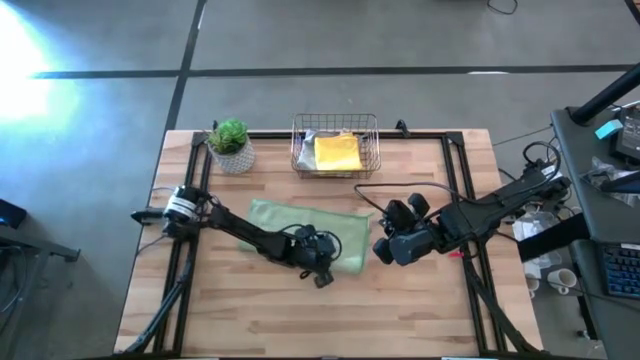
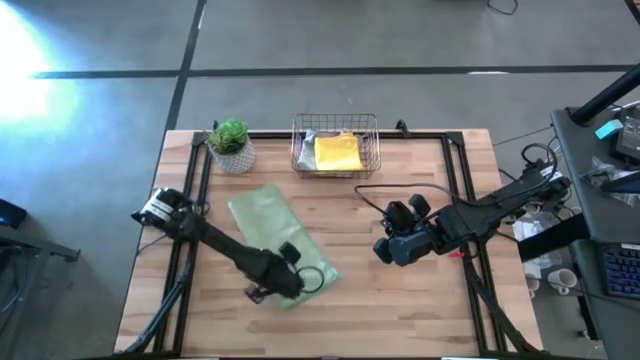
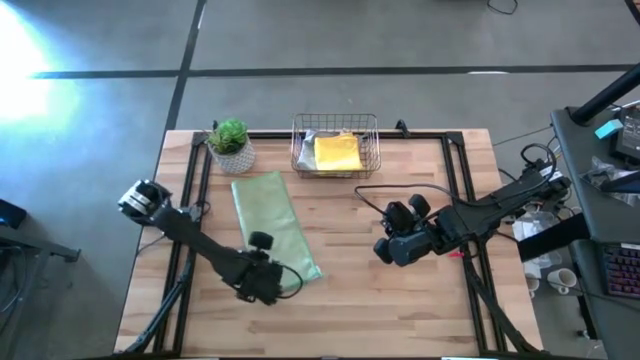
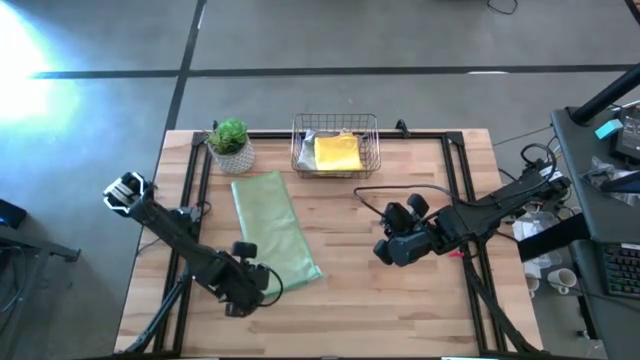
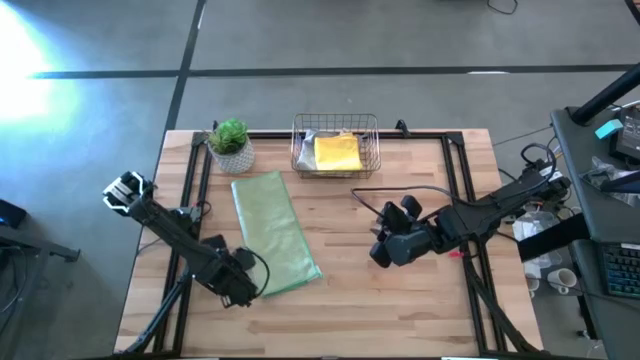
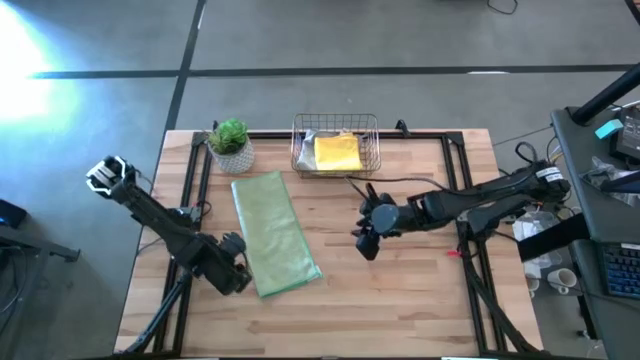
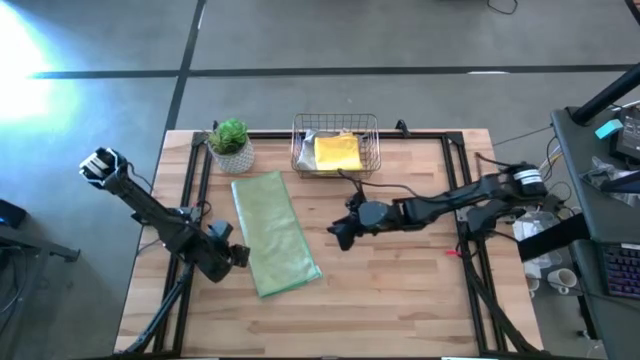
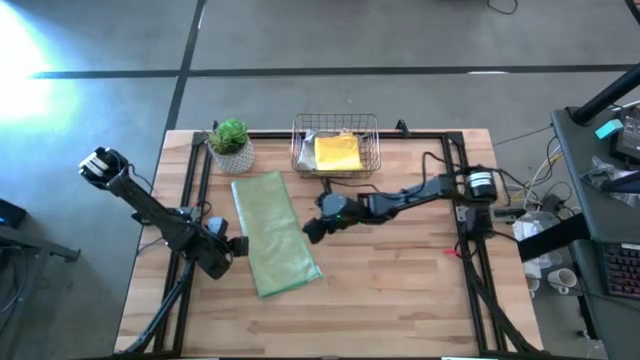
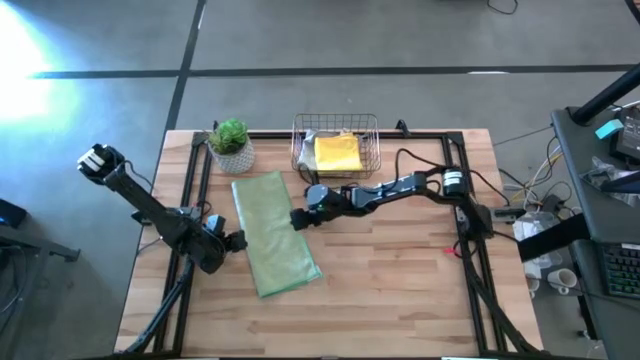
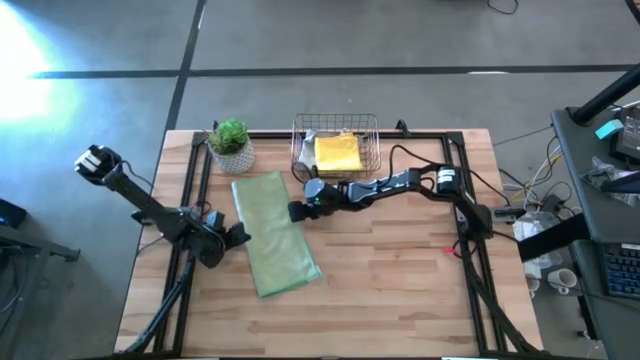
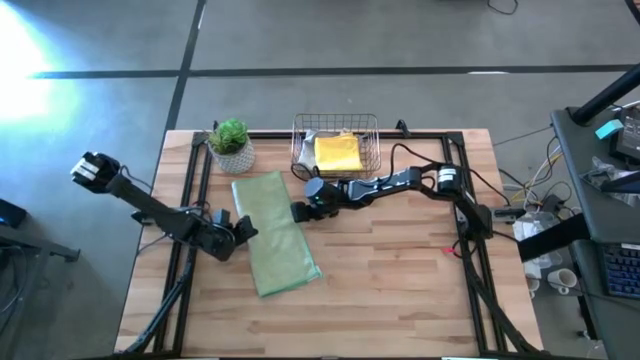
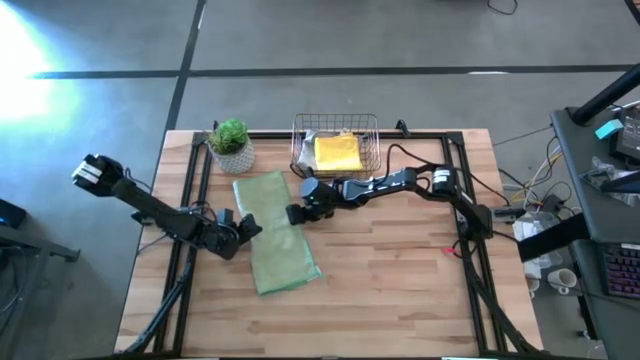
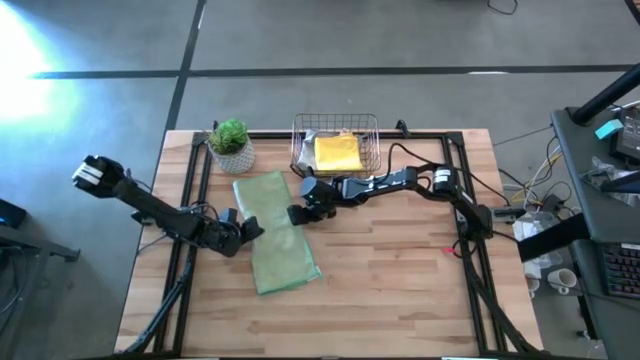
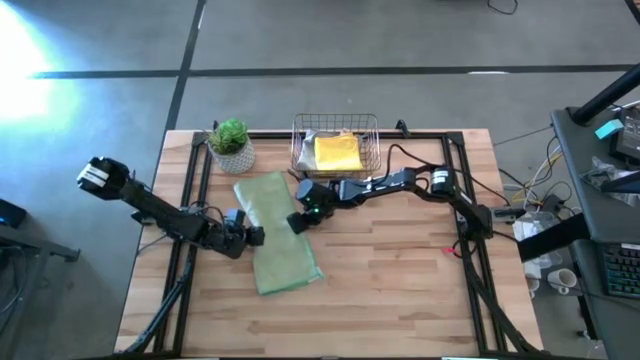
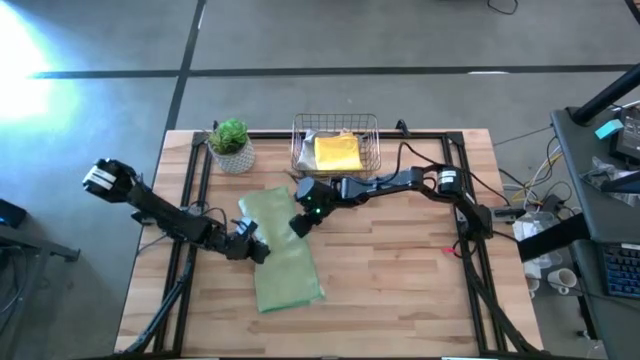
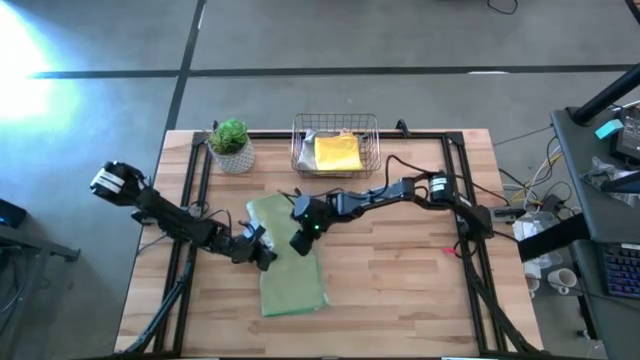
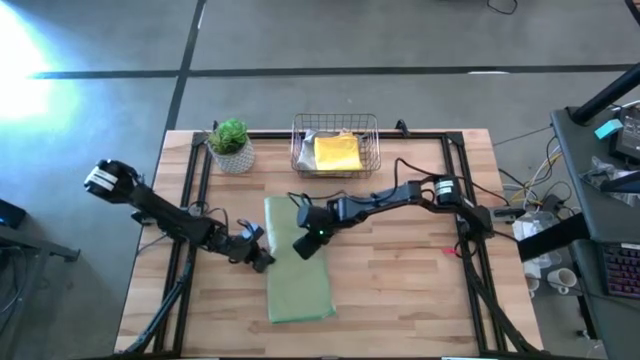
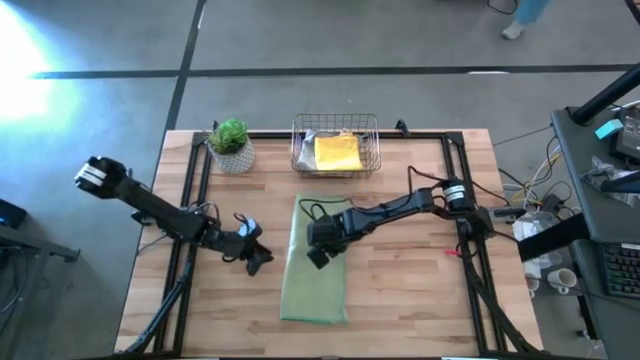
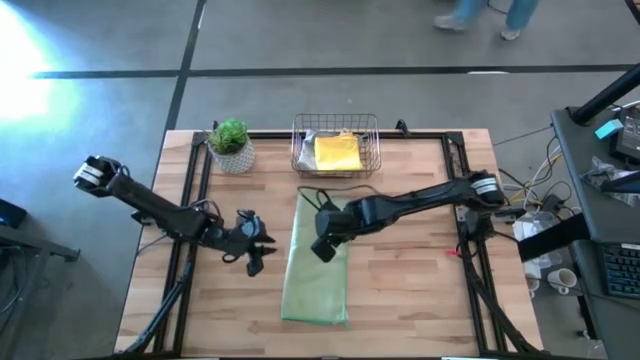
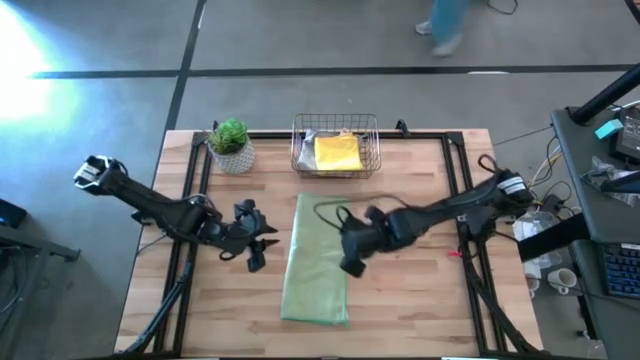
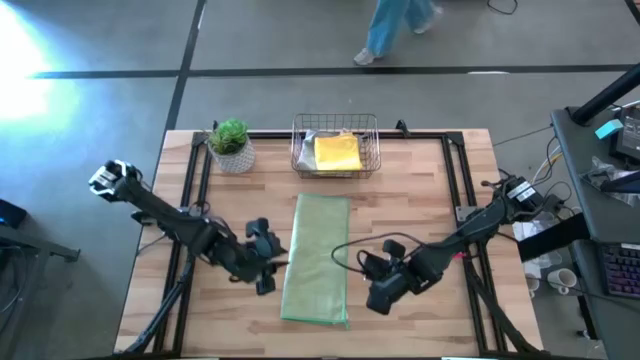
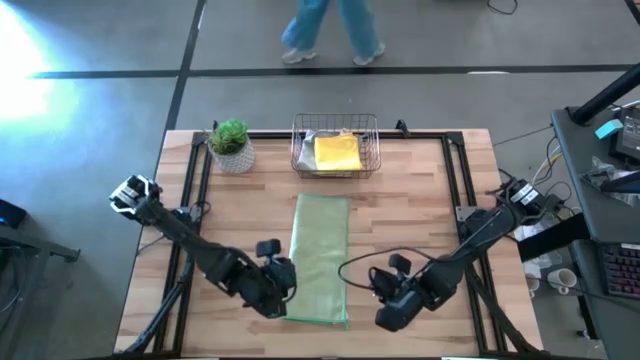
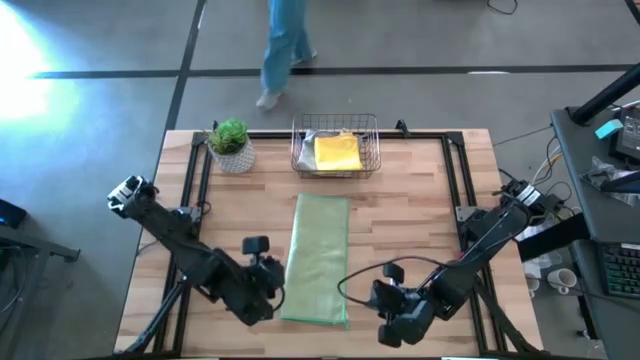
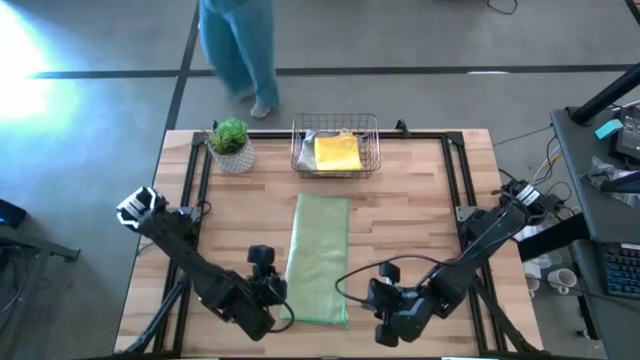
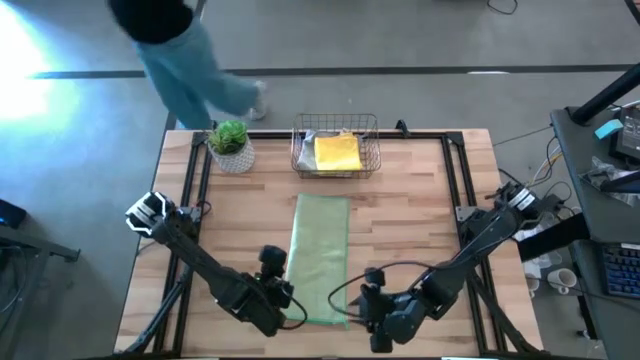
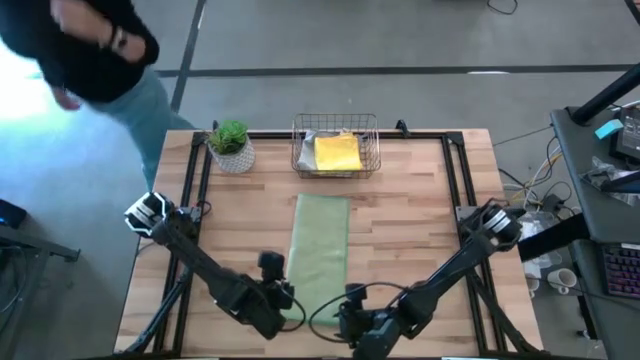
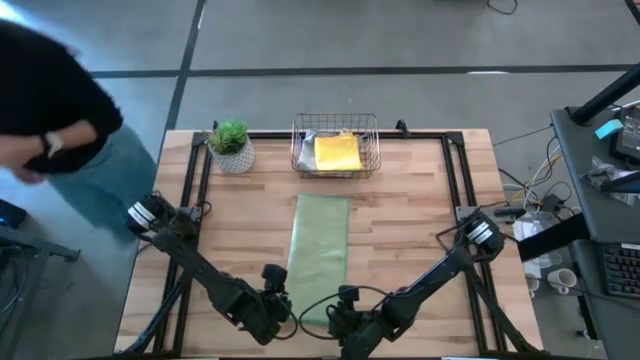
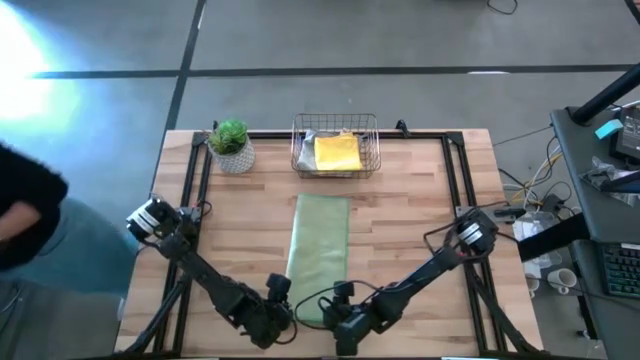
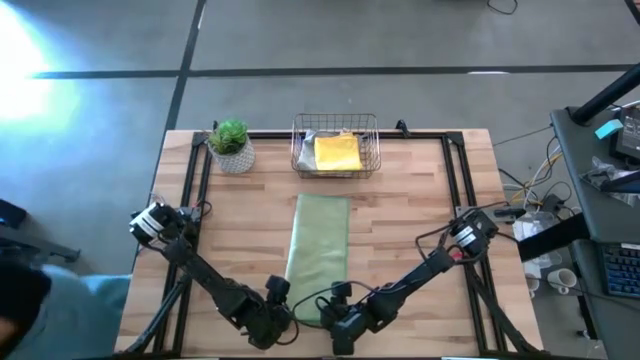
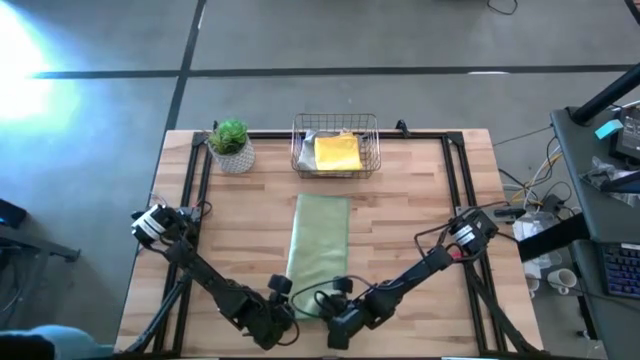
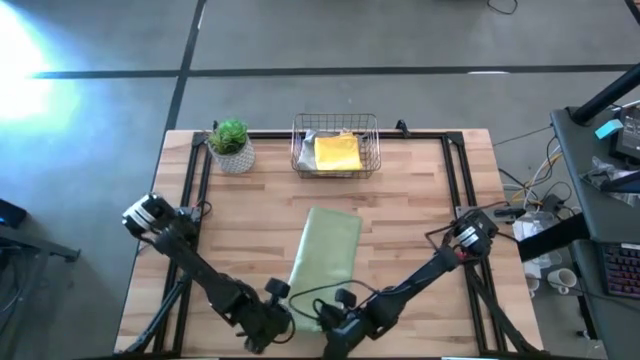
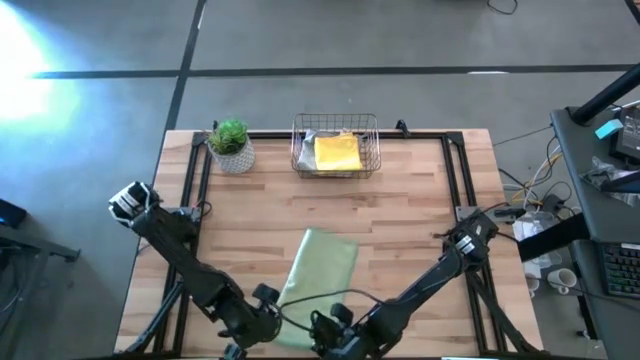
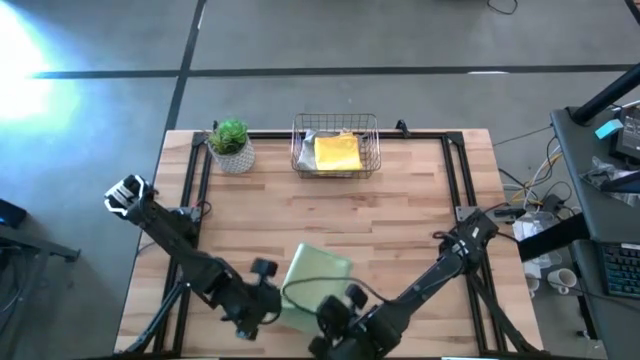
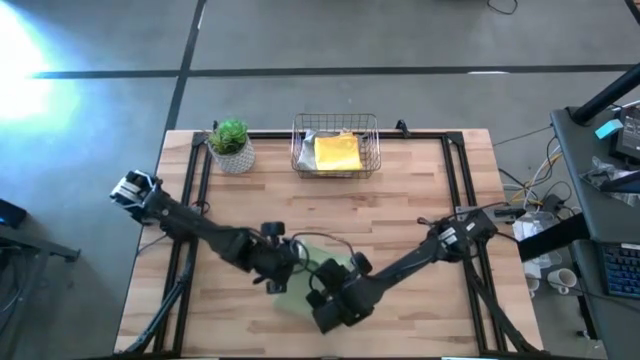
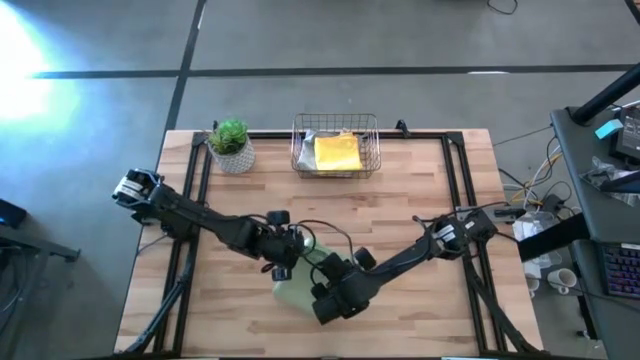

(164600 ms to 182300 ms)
Task: Fold microfiber towels
Fold the green towel

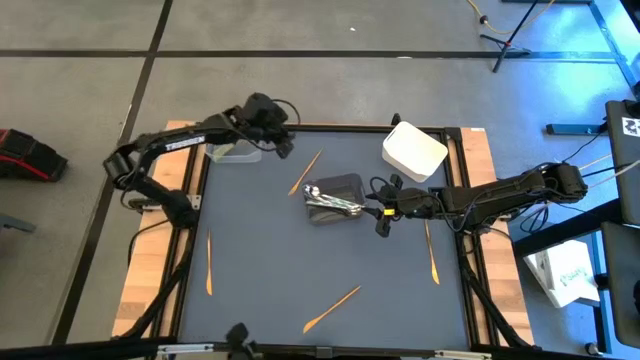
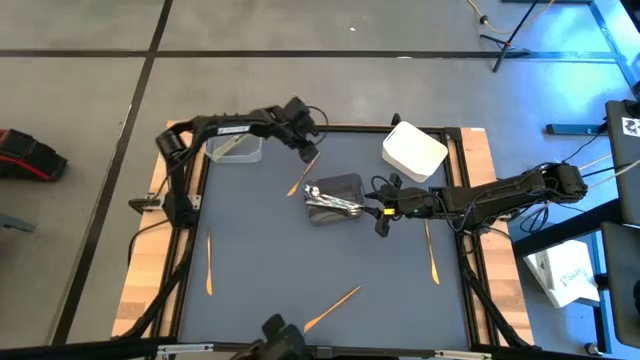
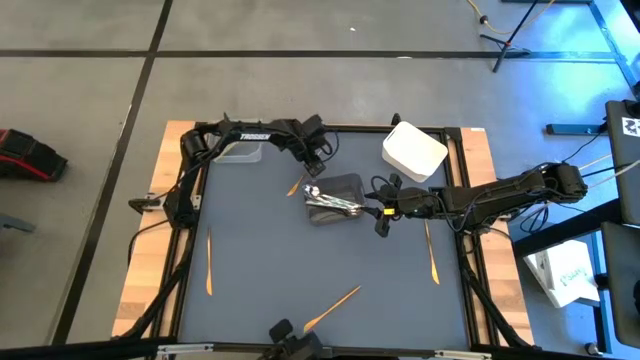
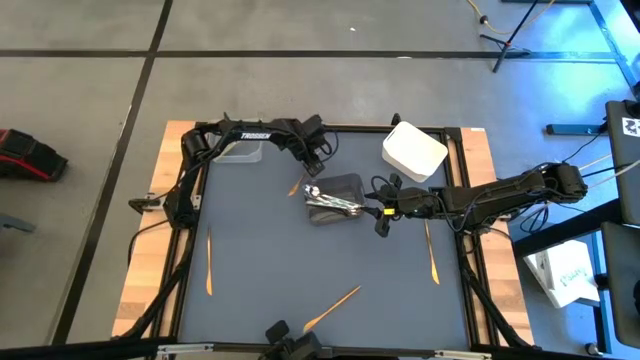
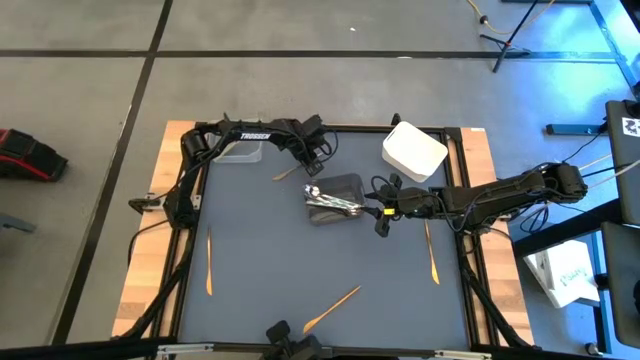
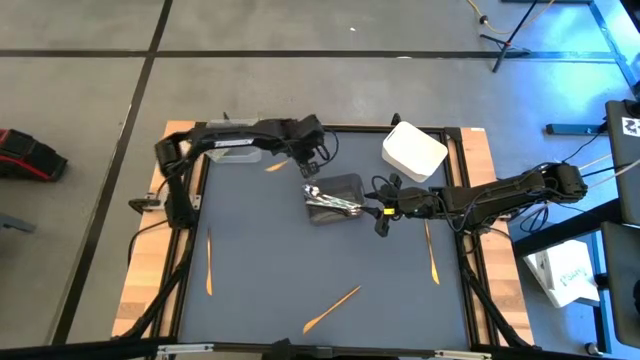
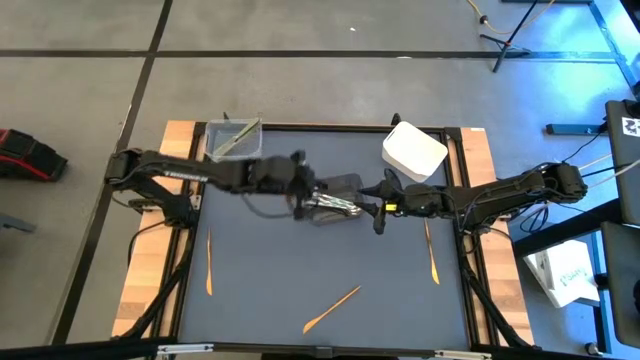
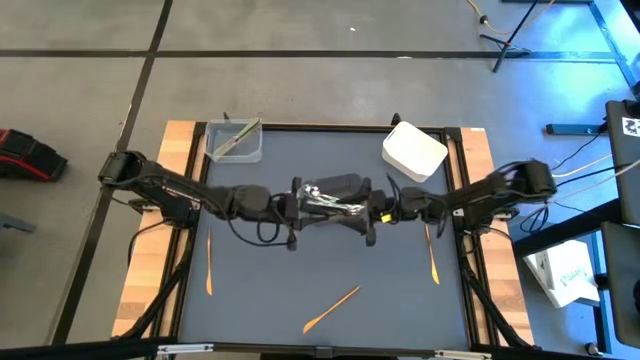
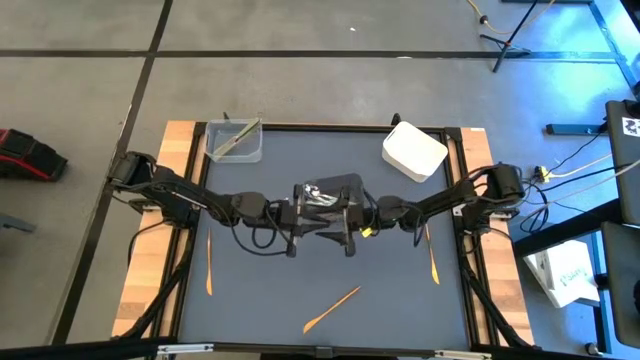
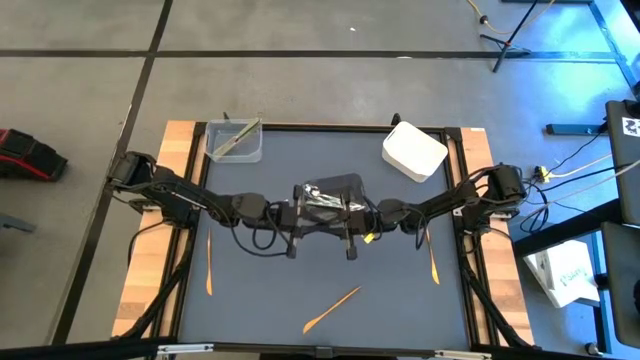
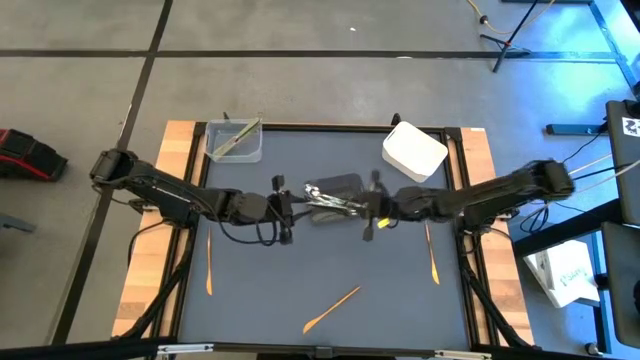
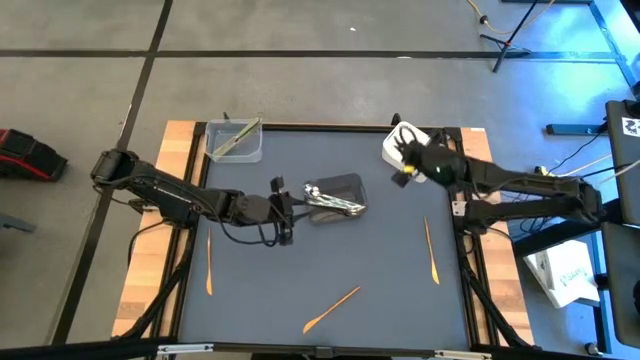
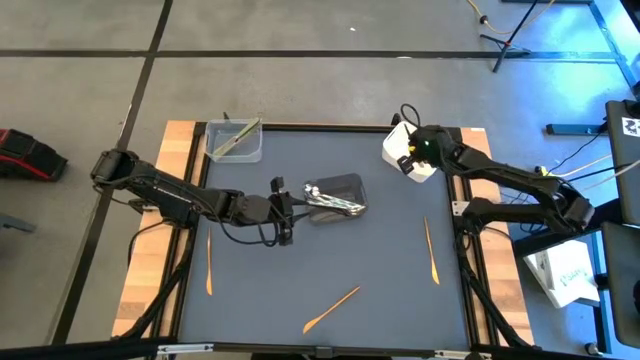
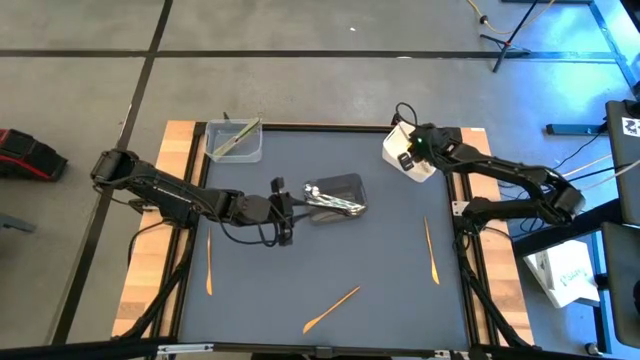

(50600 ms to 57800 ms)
Task: Sort silverware by color (type)
Put the top gold table knife into the white bin
